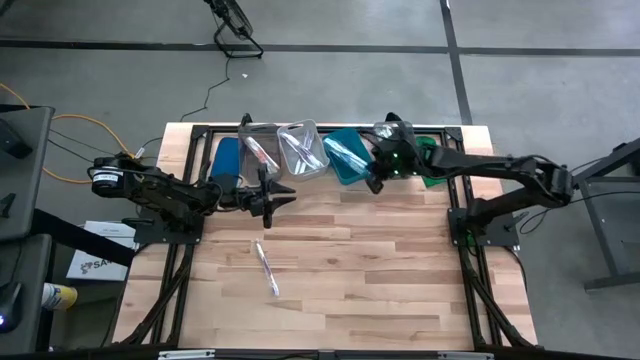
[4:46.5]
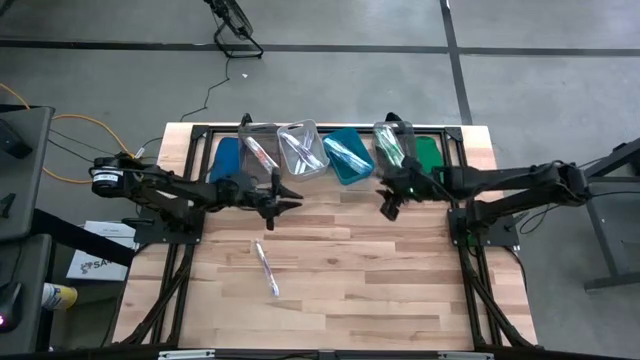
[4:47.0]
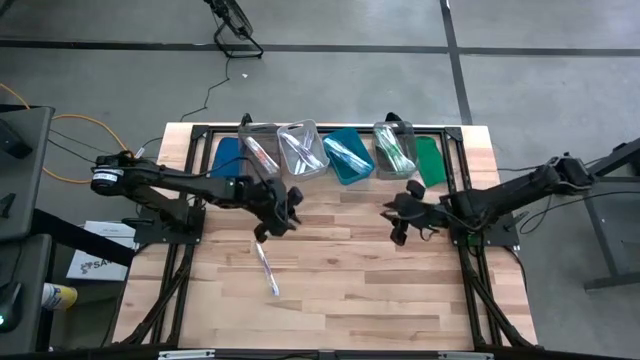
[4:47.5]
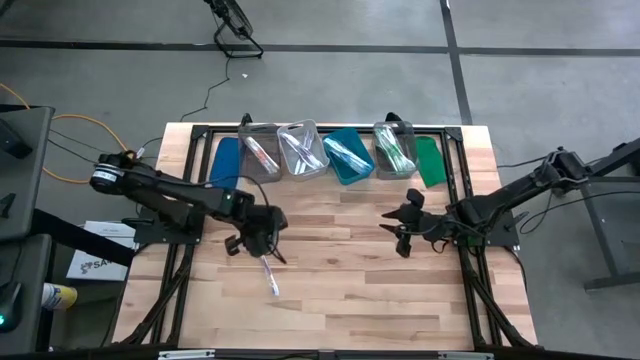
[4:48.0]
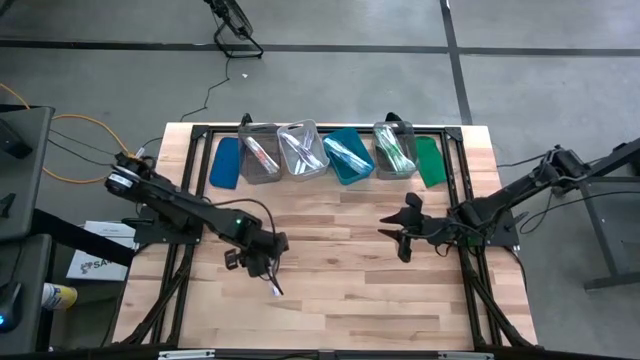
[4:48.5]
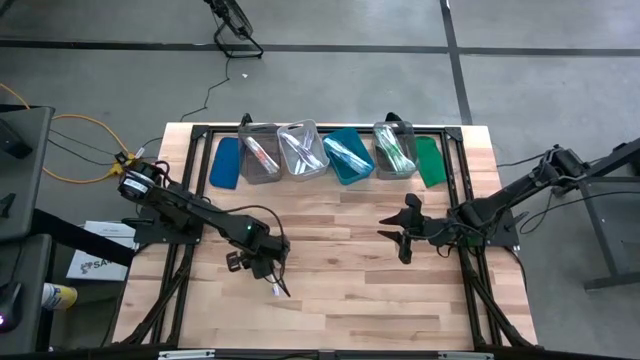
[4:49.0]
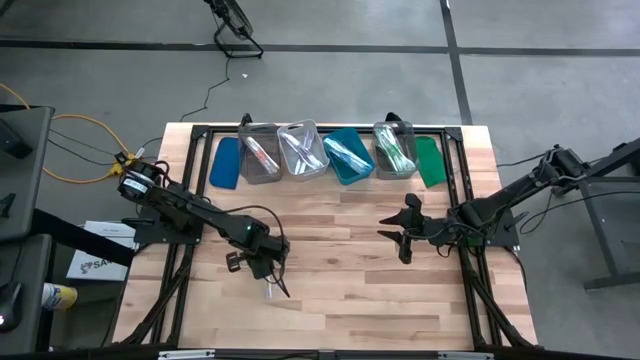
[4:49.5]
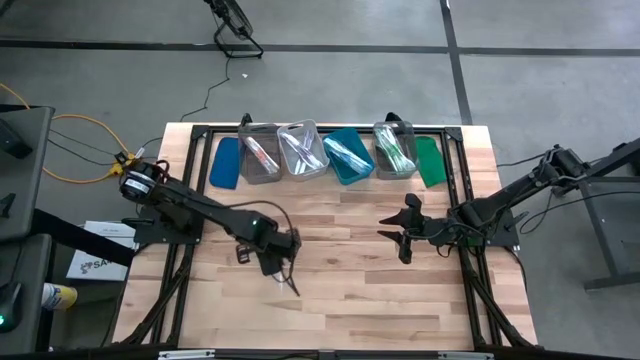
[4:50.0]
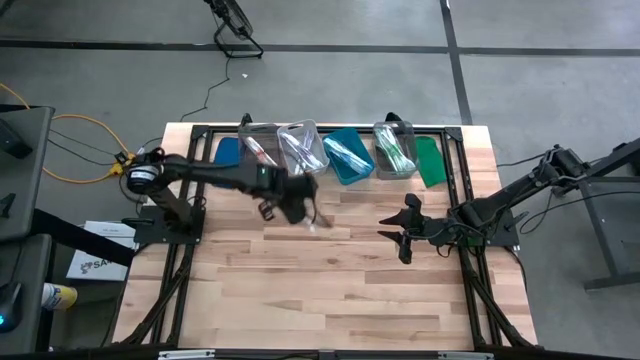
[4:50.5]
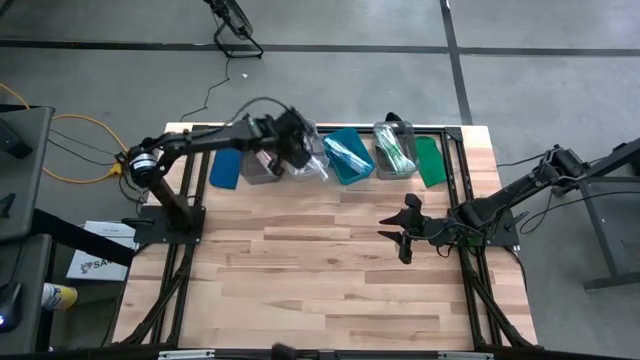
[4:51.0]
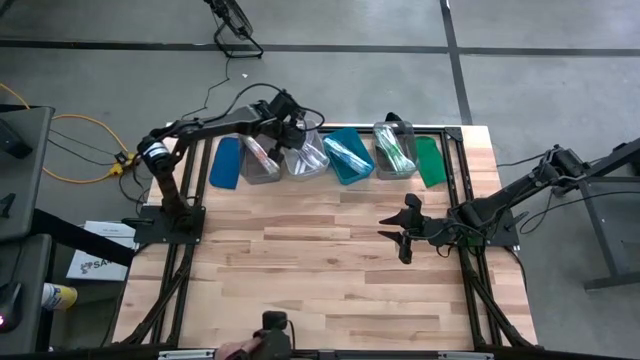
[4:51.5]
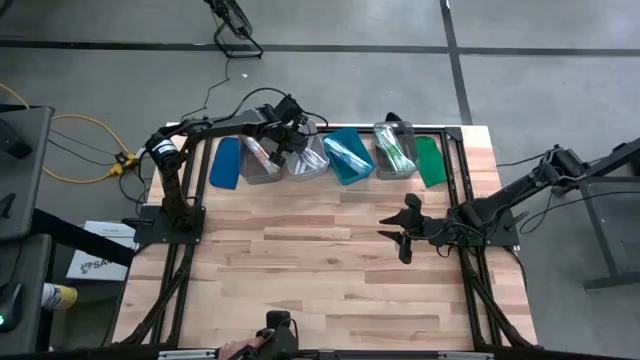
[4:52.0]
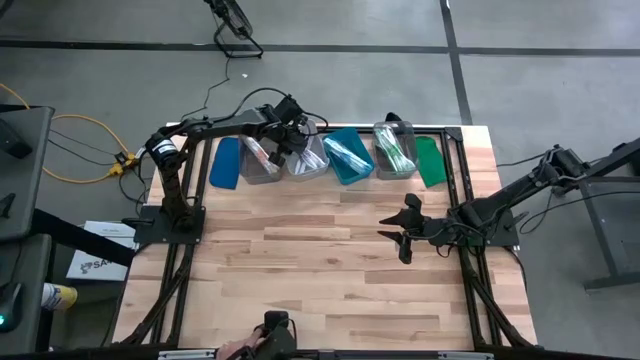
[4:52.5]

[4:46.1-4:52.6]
Task: Pick & Place Toothbrushes
Put the violet toothbrush into the gray bin

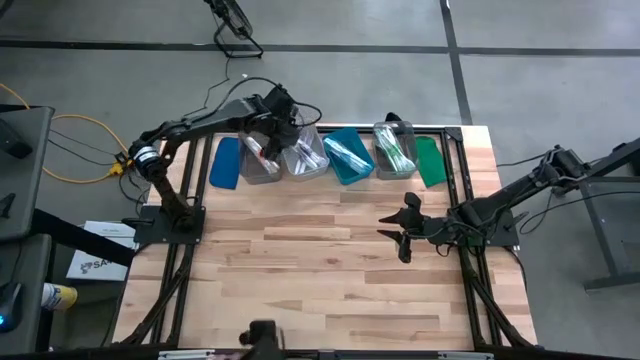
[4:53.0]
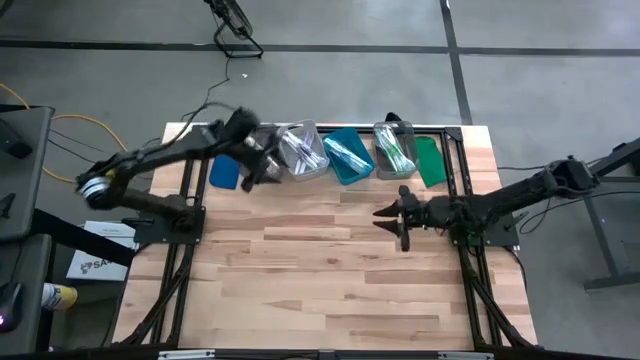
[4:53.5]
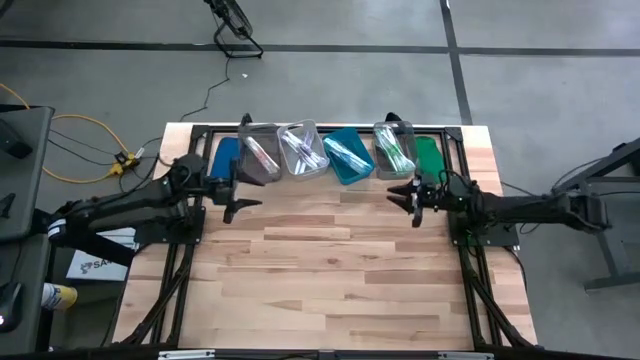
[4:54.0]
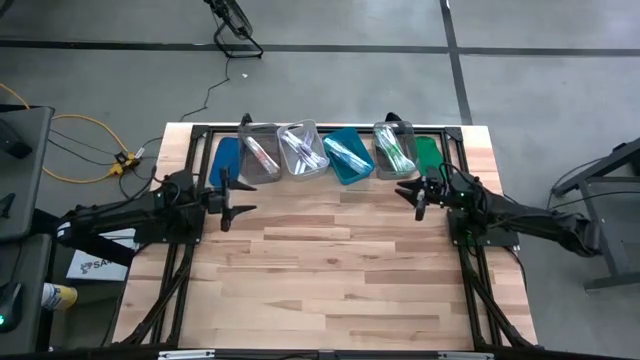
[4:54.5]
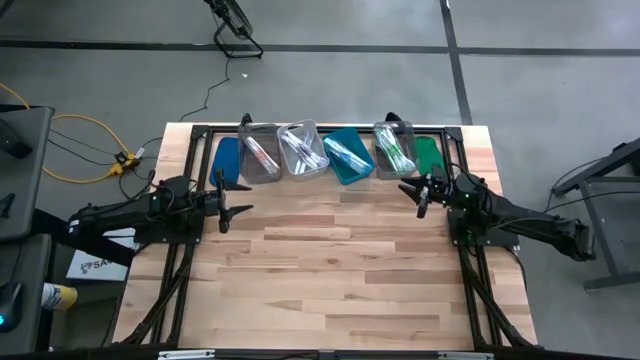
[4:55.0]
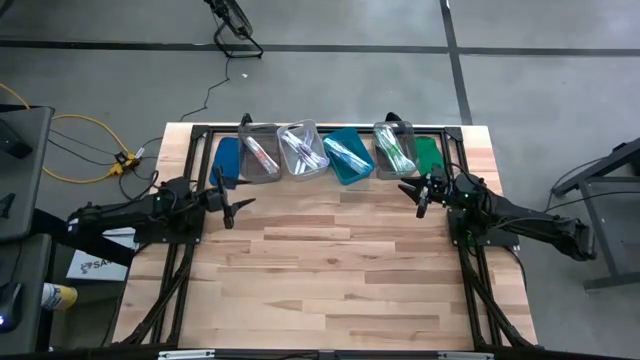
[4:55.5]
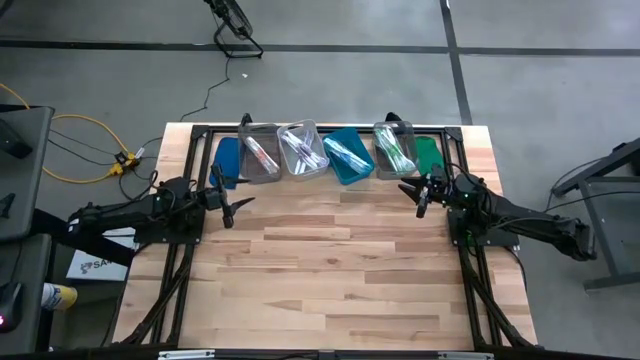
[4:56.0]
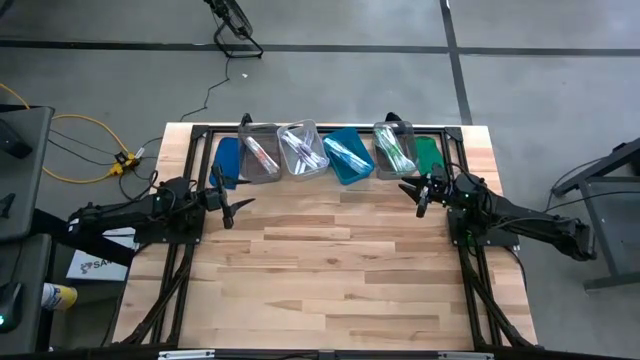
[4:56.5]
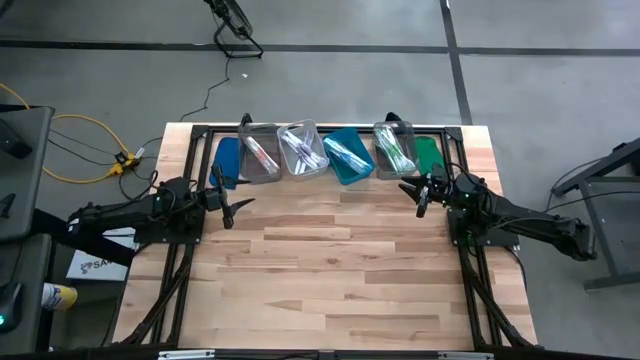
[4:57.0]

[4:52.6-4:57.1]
Return to Home Position

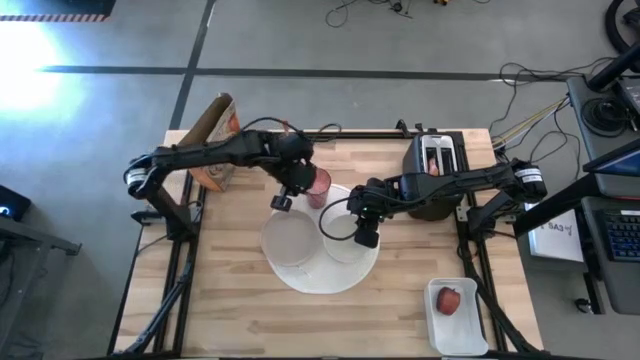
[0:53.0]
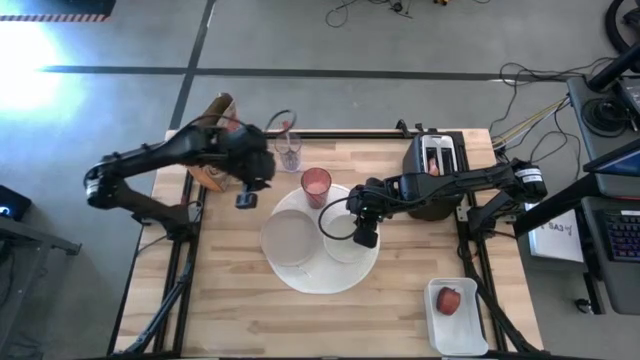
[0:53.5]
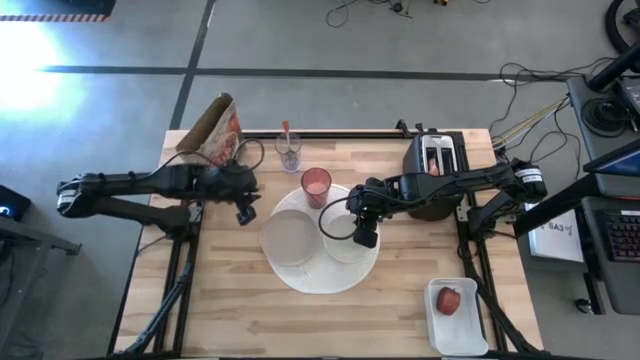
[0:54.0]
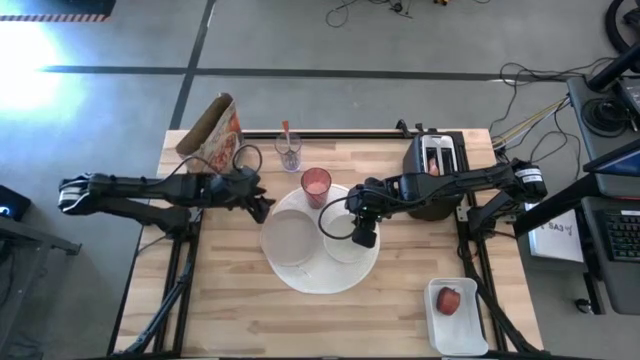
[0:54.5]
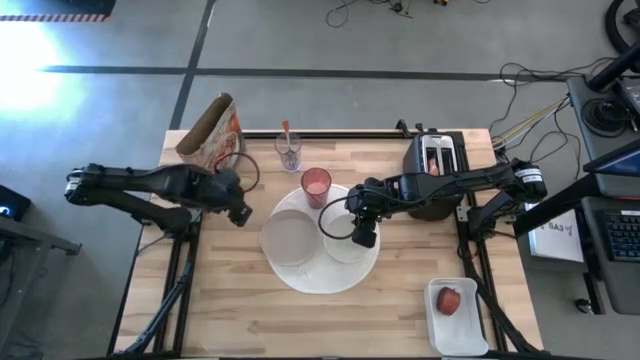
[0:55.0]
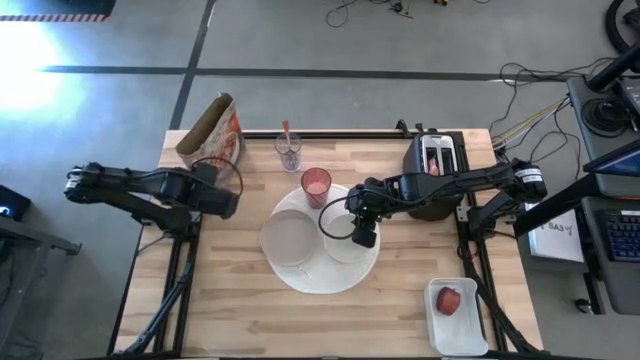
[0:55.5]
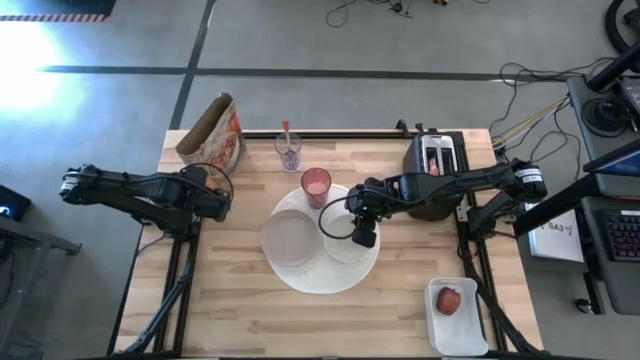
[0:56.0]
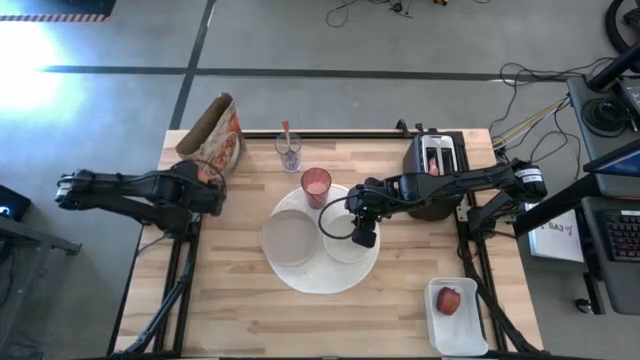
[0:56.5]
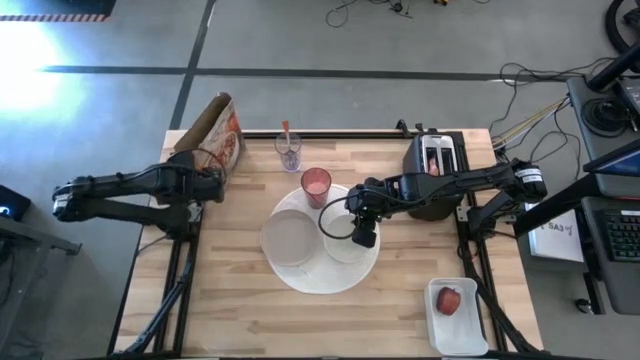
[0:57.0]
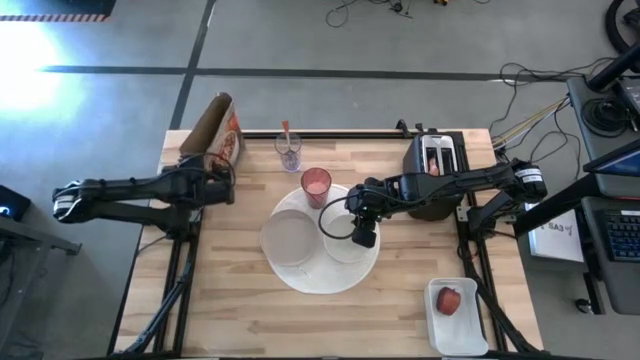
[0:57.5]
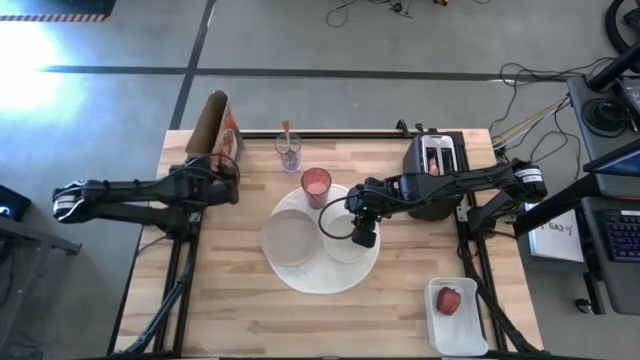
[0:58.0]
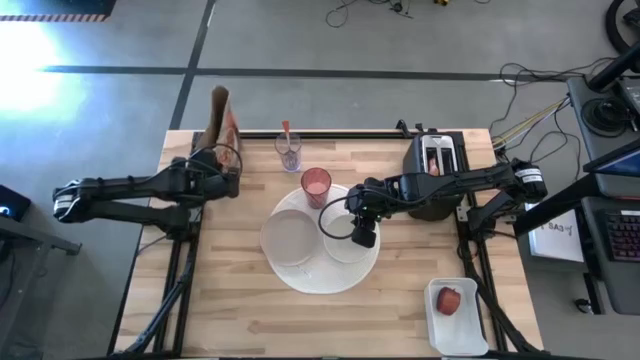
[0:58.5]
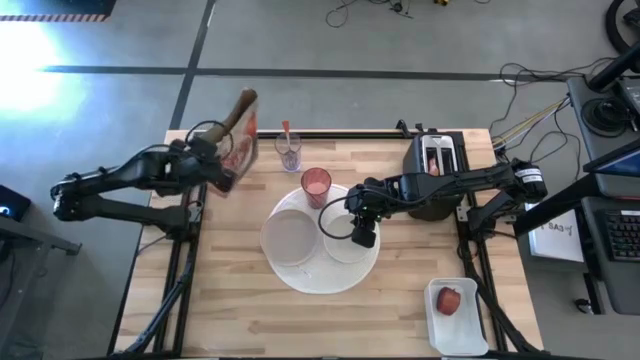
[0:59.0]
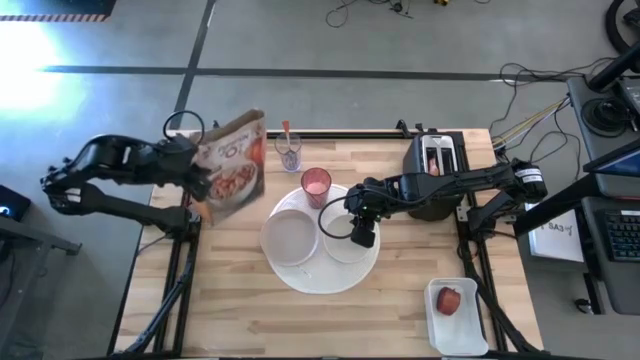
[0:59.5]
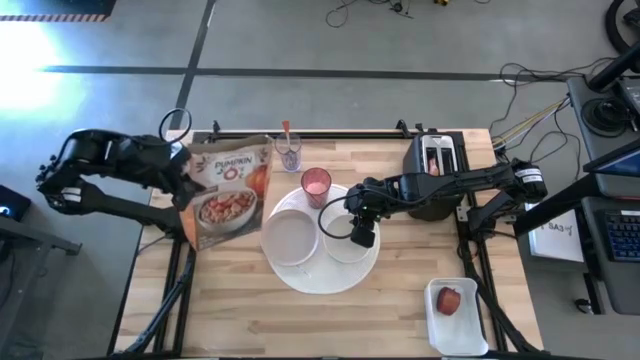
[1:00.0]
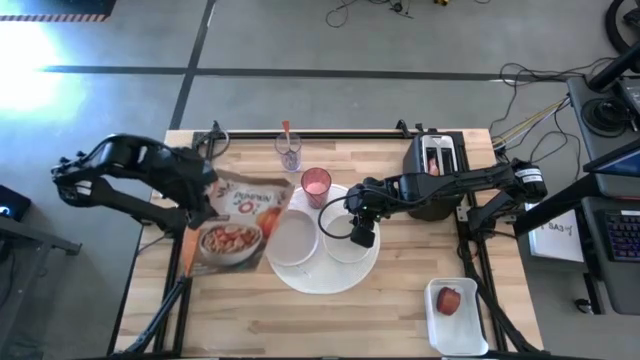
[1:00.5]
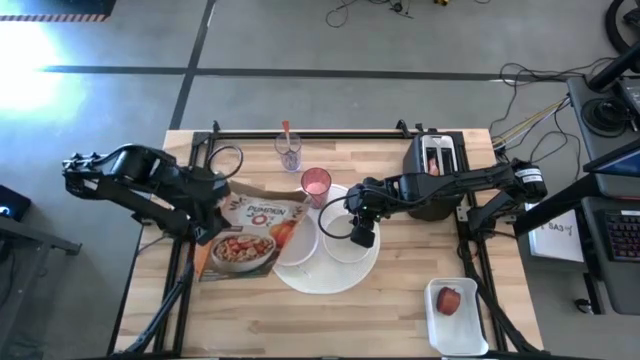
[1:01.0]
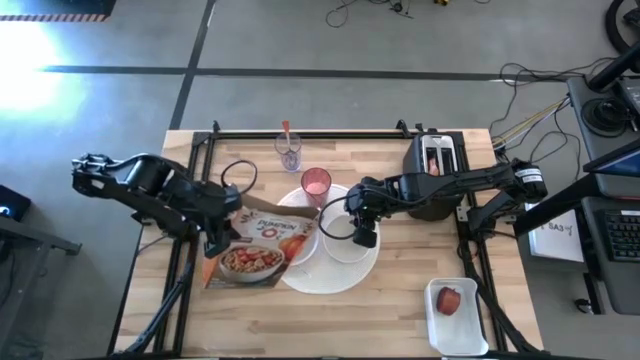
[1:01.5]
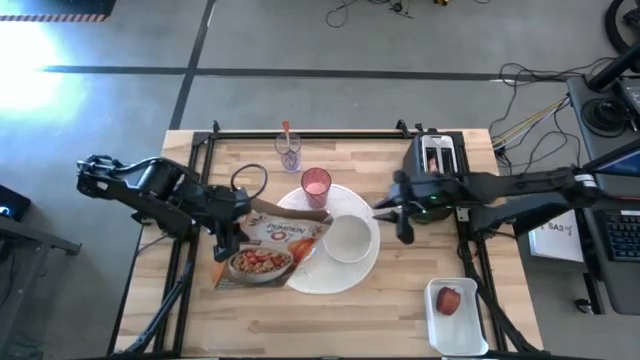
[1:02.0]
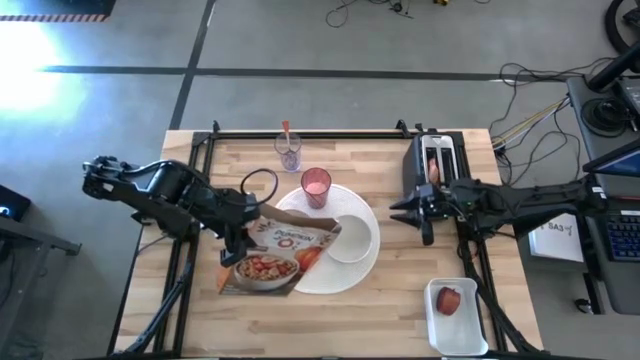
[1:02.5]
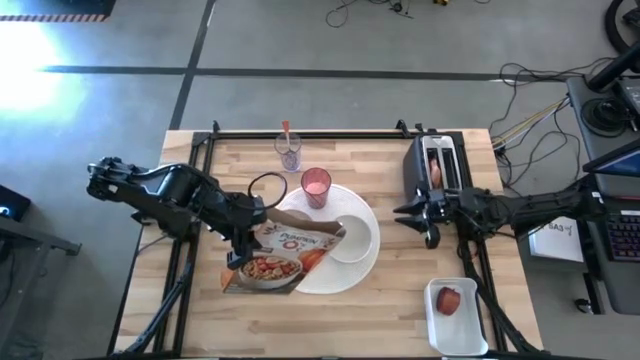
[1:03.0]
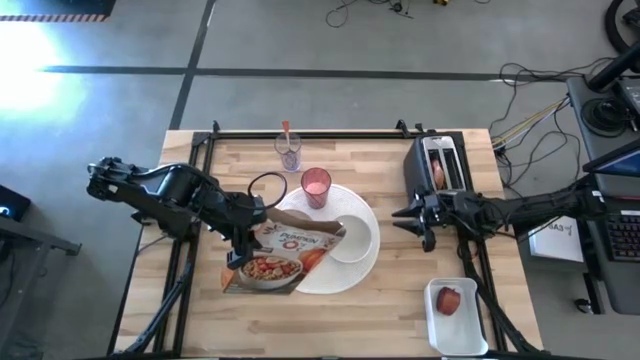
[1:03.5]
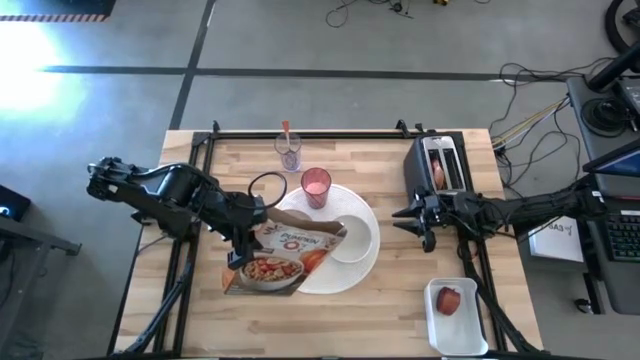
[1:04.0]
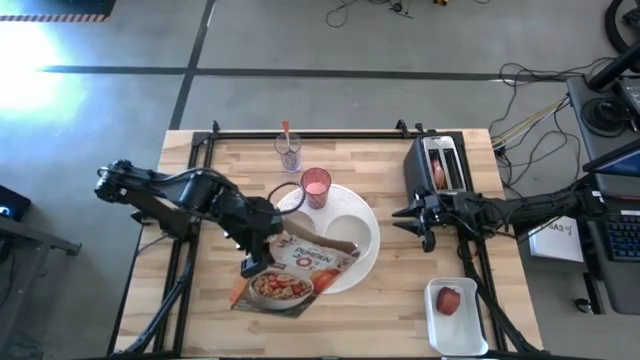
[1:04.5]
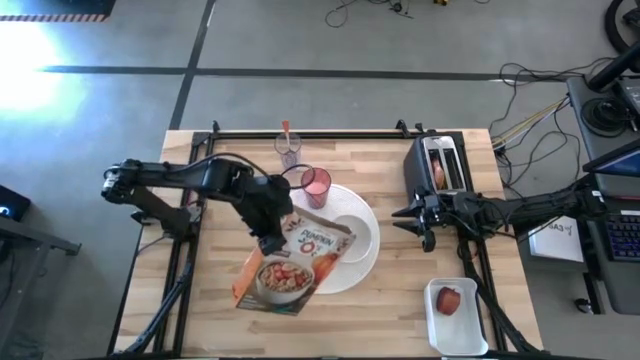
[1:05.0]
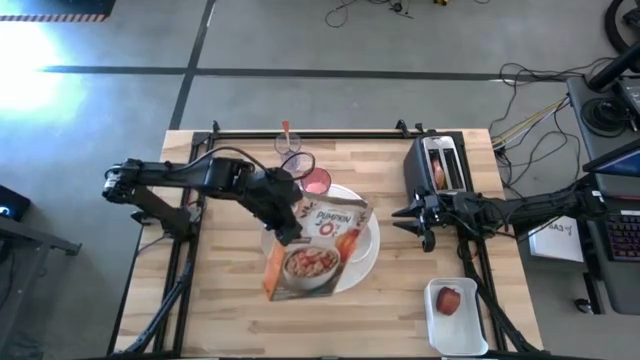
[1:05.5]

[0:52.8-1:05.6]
Task: Arrange a breakfast setting
Pour the white cereal from the orange cereal box into the white bowl
